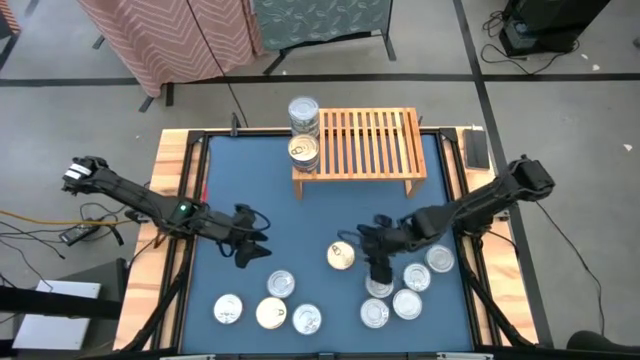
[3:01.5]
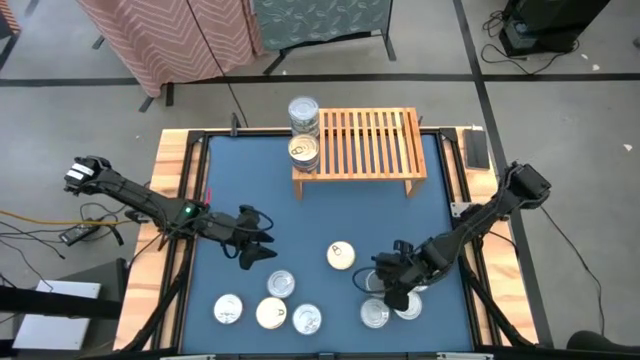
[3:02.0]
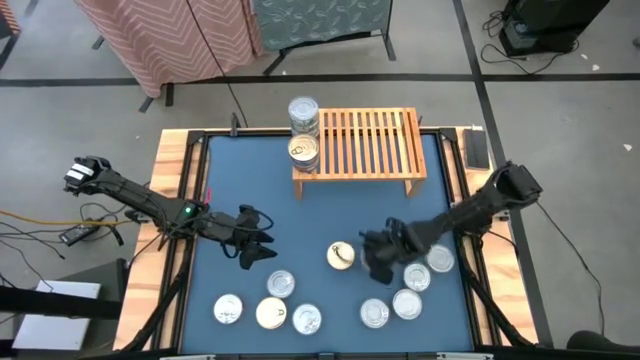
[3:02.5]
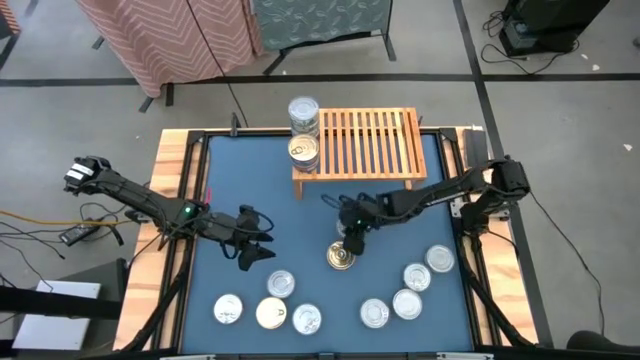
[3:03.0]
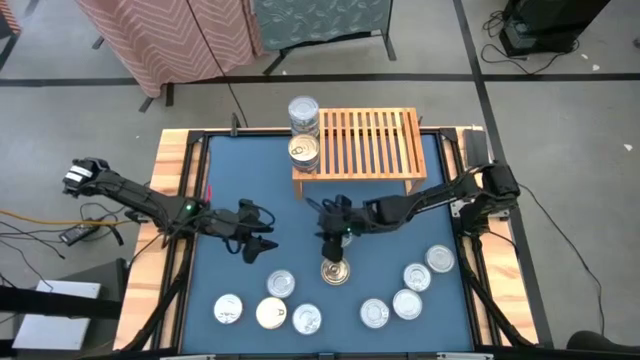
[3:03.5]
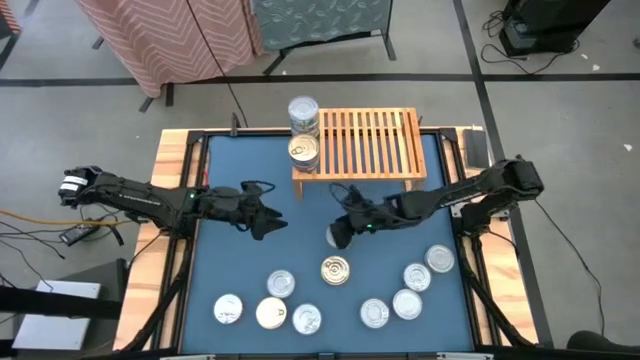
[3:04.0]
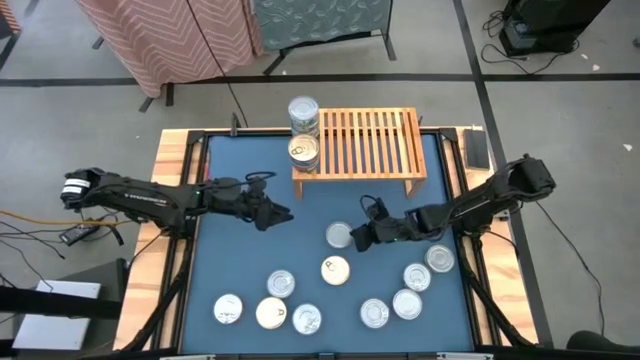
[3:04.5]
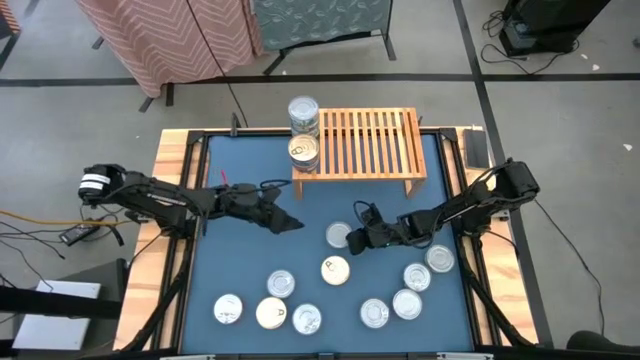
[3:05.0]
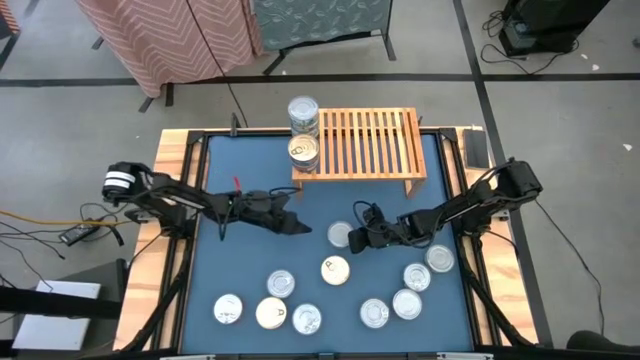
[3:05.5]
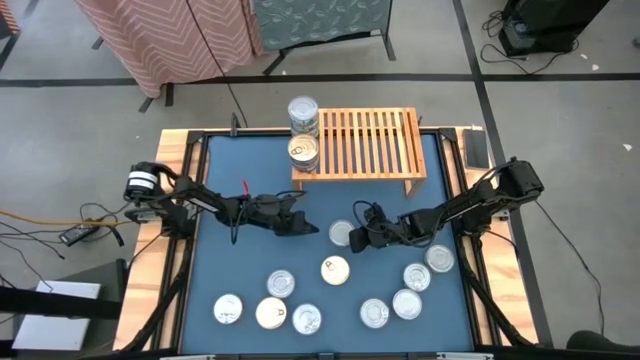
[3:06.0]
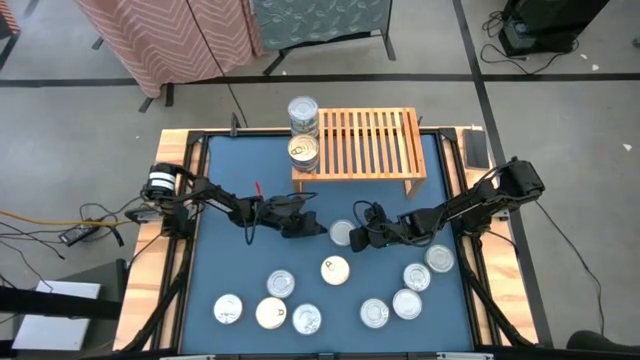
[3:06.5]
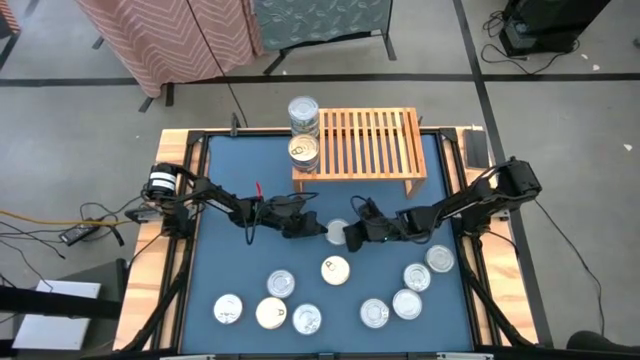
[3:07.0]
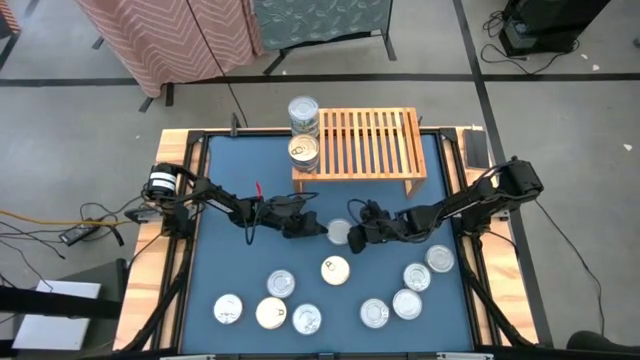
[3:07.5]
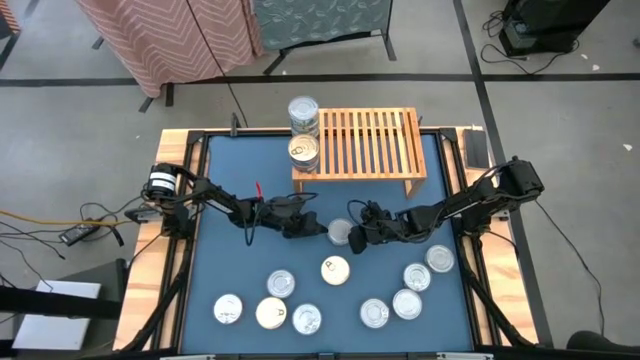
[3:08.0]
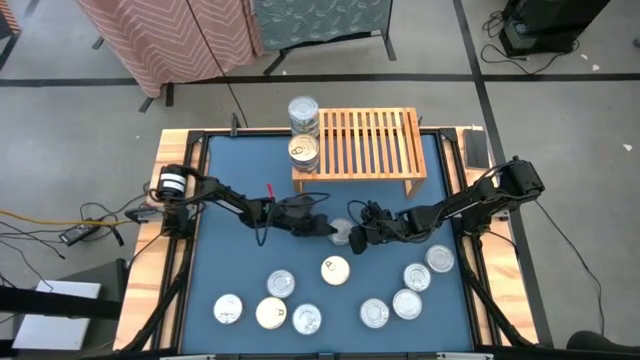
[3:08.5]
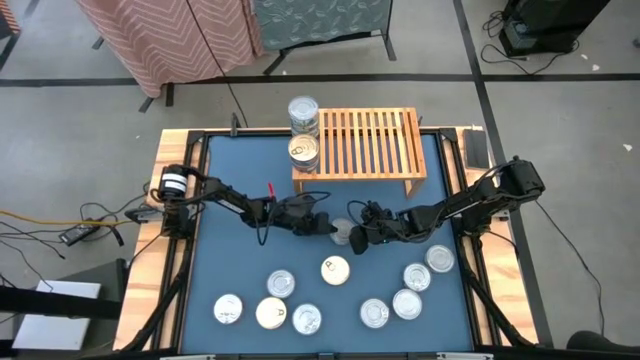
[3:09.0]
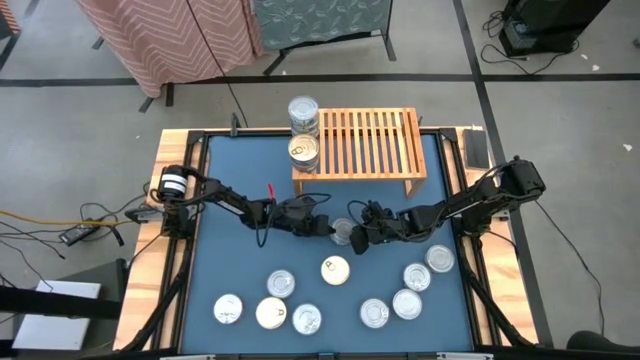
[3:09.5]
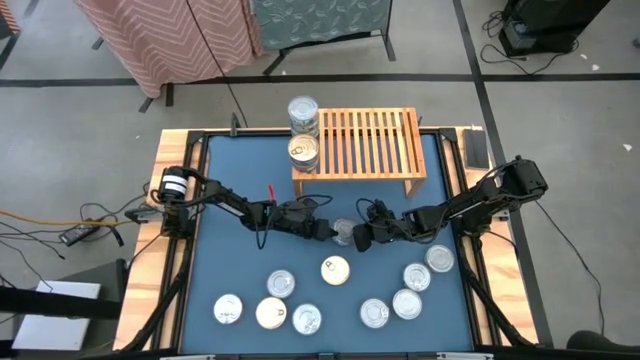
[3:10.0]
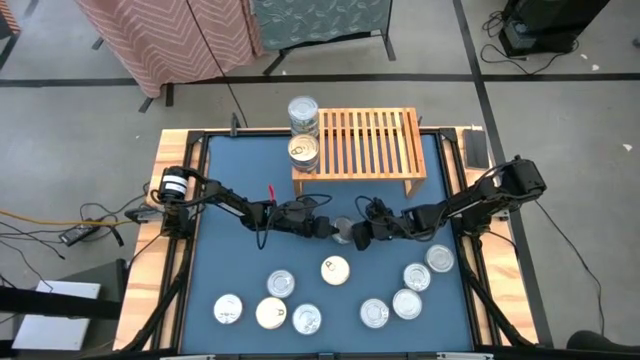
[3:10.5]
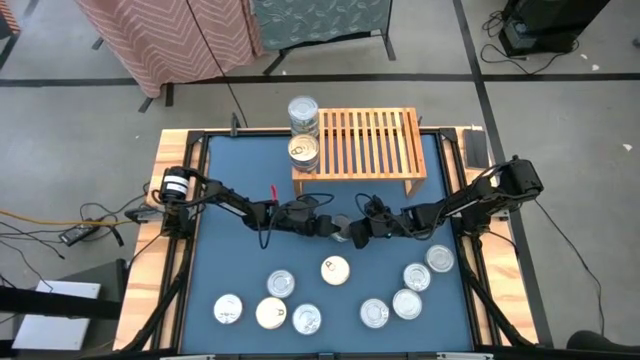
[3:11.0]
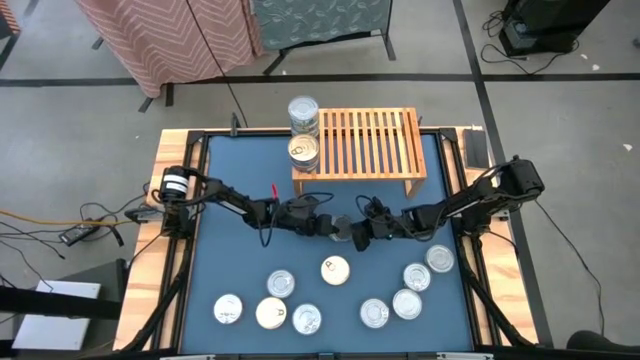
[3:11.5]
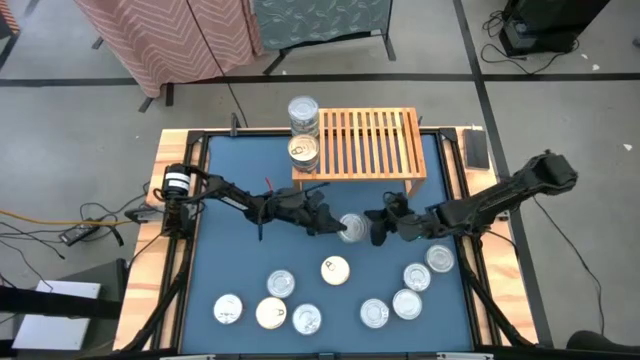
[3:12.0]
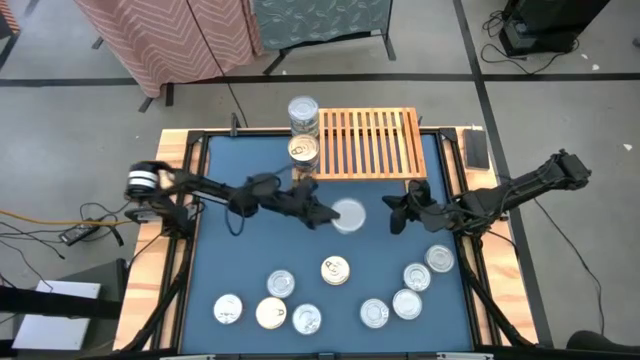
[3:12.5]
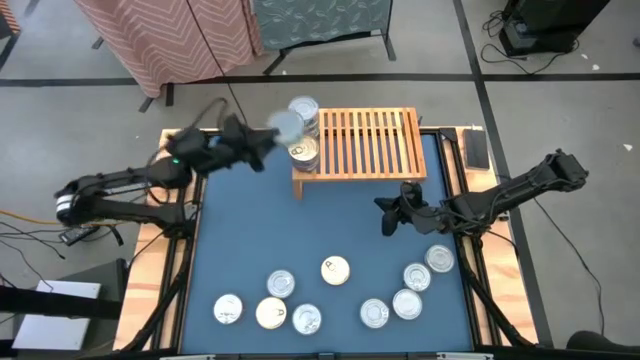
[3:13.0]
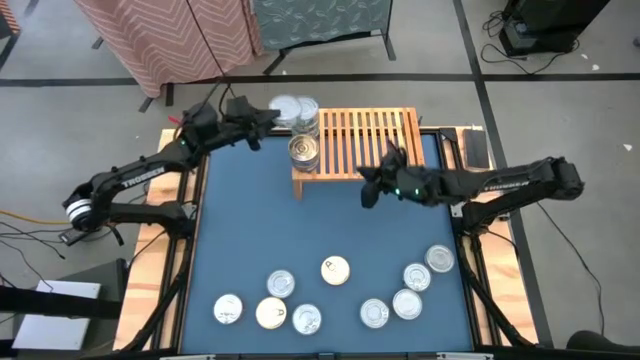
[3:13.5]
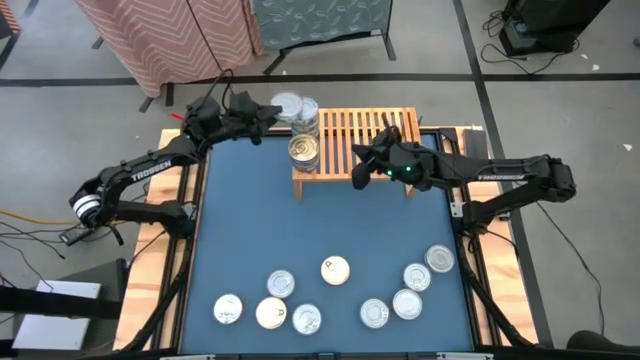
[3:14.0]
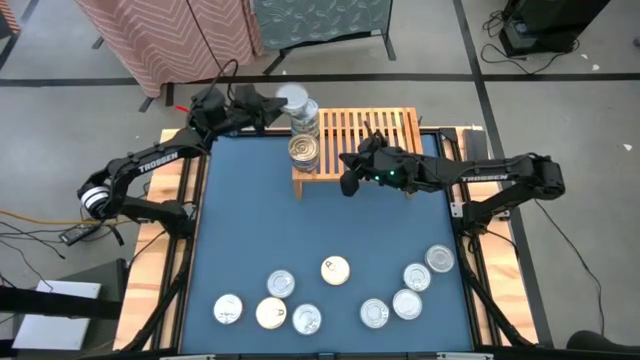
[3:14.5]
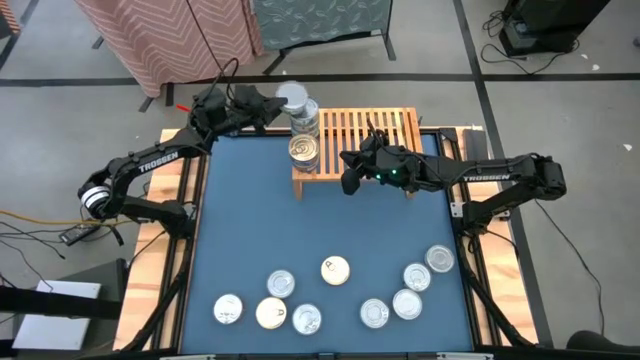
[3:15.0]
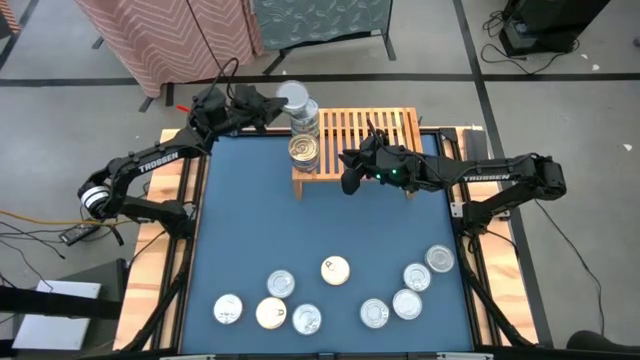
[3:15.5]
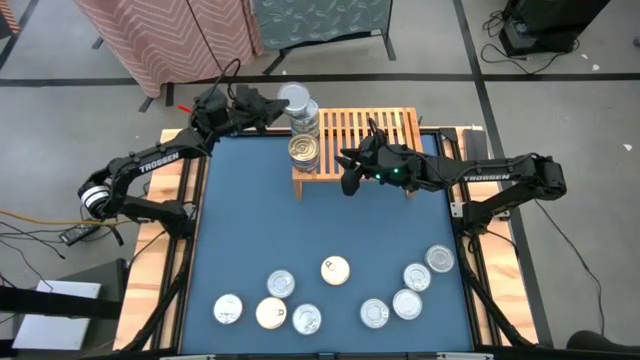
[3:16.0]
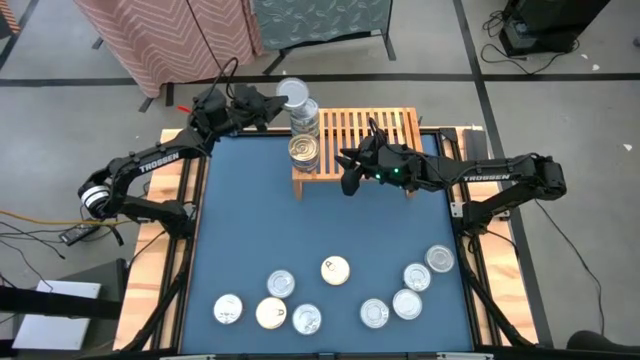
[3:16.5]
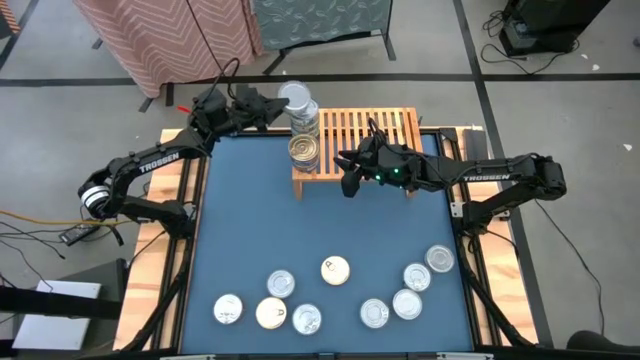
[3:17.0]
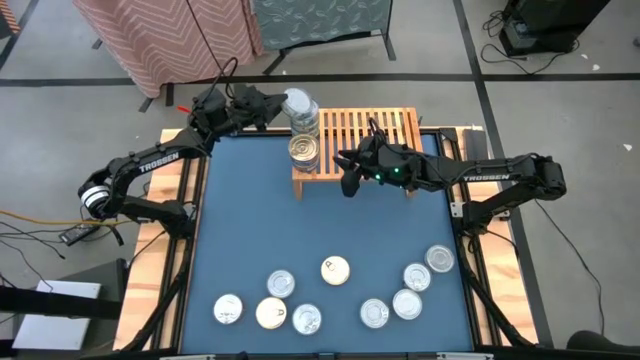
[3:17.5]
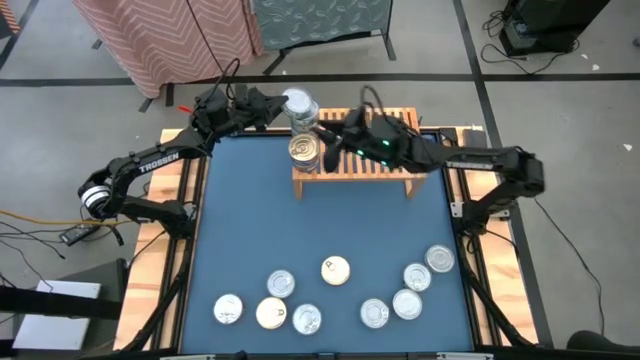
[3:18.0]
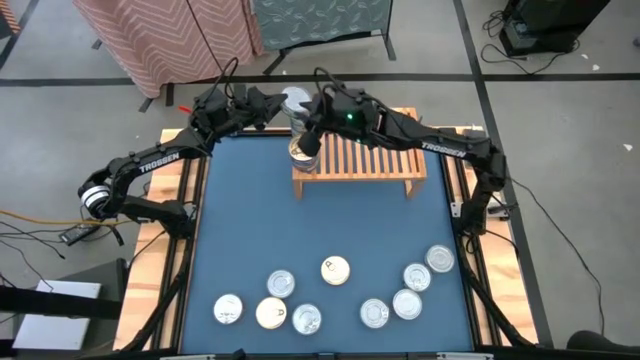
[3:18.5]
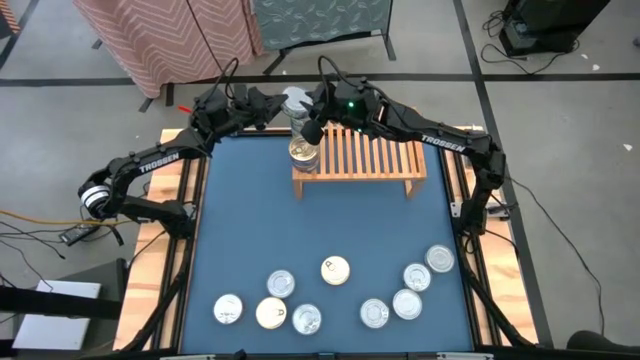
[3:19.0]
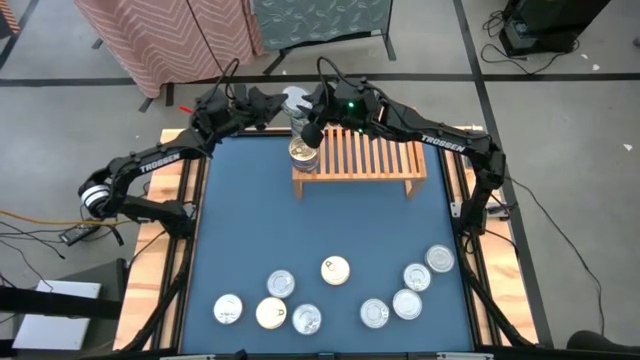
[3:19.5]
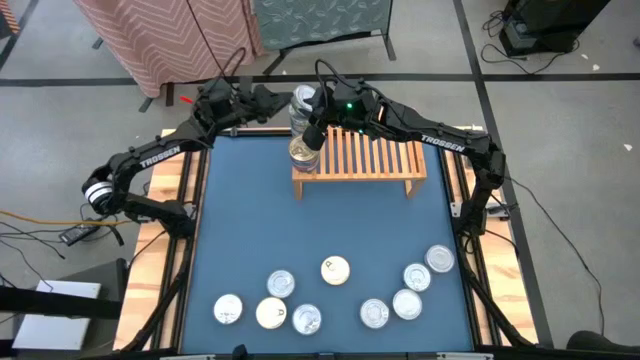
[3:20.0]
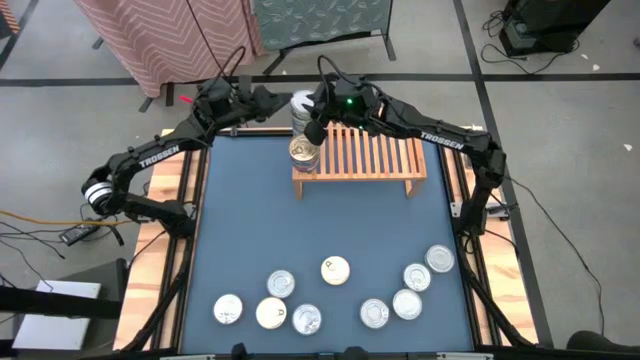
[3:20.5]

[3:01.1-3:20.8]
Task: Stack canned seafood by type on shelf
Stack the green tuna can on top of the other green tuna cans on the shelf

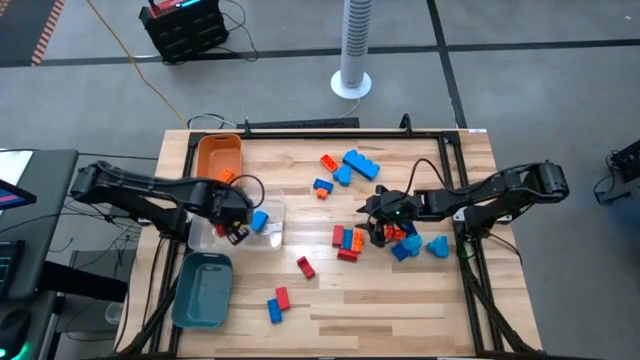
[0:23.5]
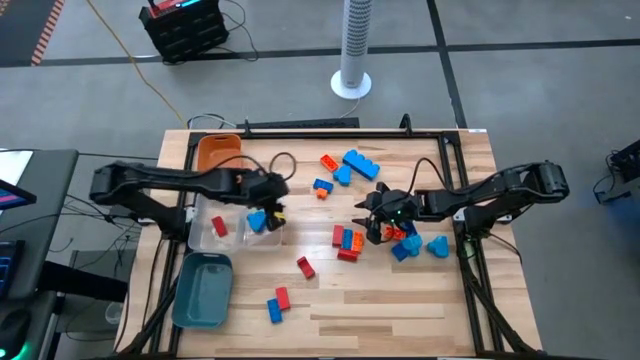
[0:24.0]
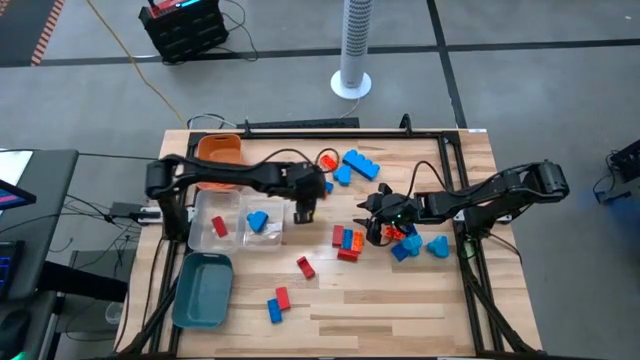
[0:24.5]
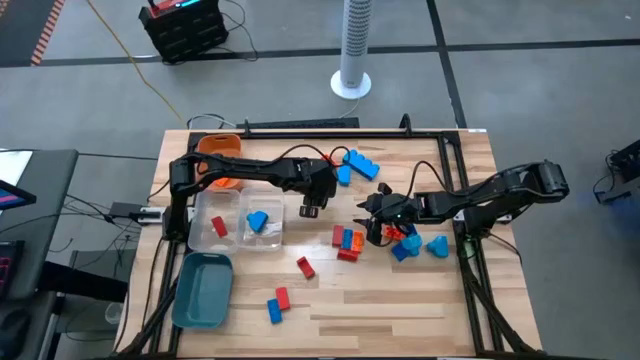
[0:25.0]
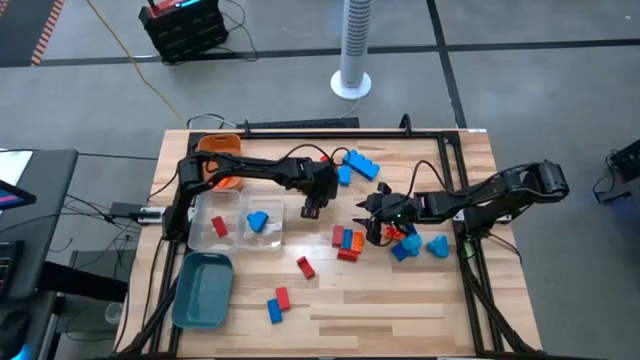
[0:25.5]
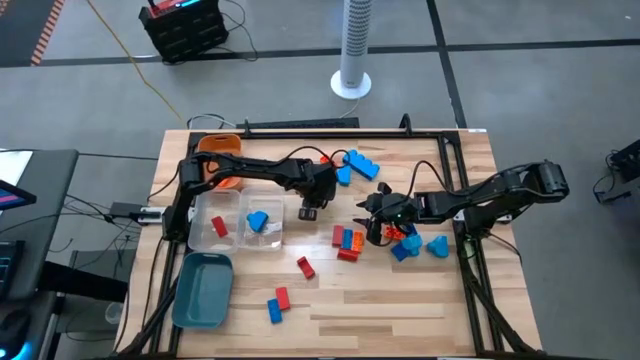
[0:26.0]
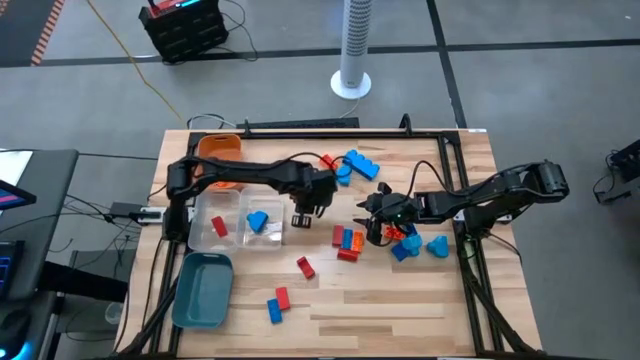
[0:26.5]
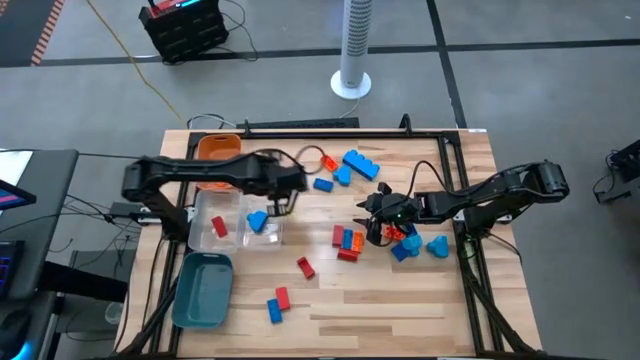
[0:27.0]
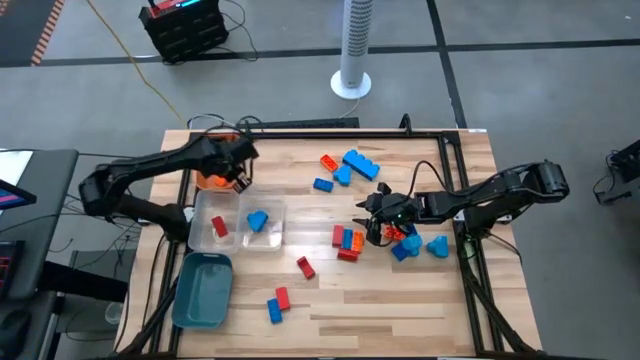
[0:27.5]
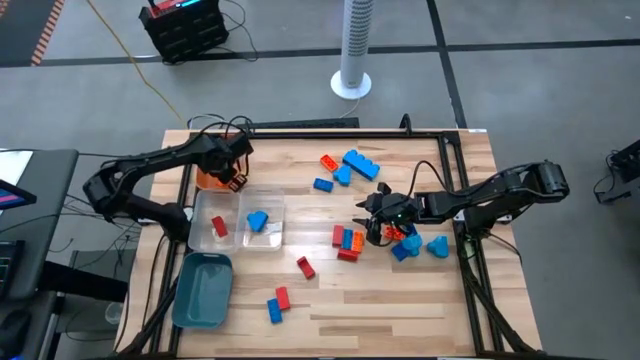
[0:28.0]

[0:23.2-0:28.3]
Task: Sort blocks
Put the orange game piece into the orange bin
